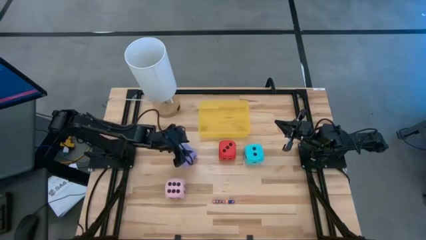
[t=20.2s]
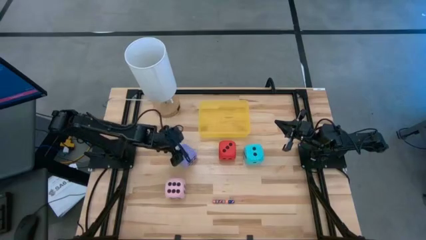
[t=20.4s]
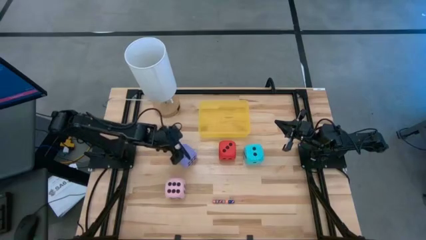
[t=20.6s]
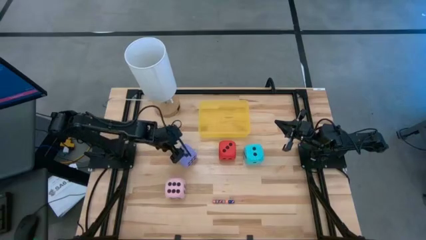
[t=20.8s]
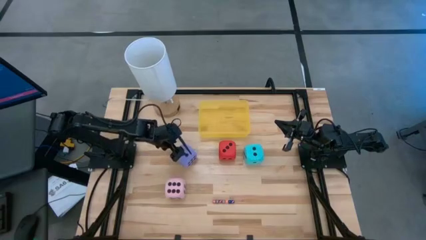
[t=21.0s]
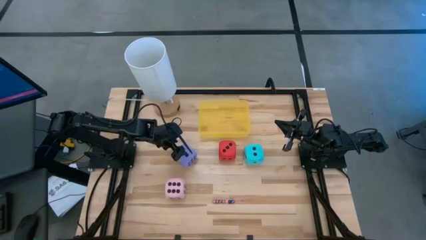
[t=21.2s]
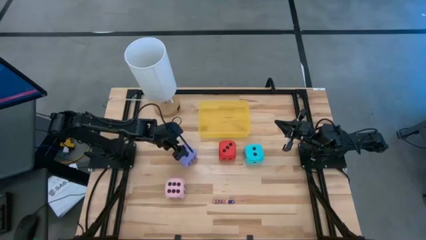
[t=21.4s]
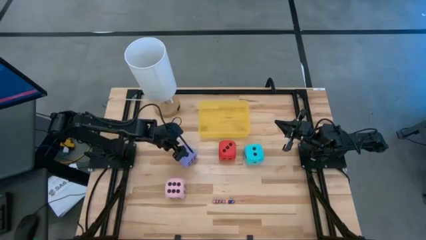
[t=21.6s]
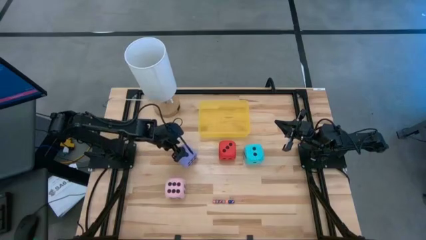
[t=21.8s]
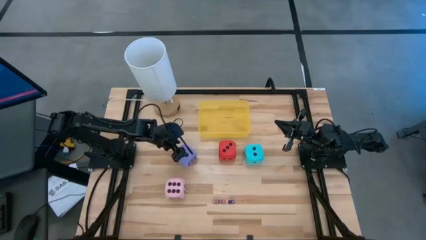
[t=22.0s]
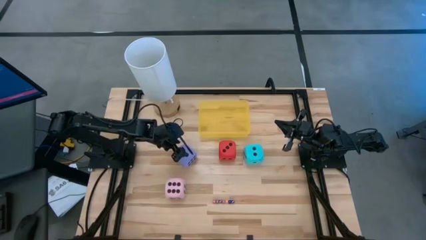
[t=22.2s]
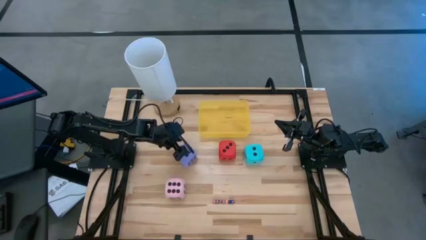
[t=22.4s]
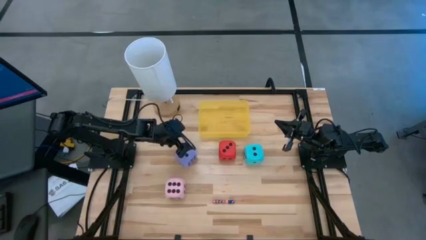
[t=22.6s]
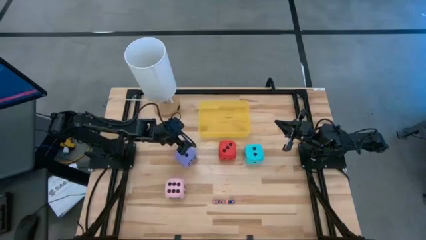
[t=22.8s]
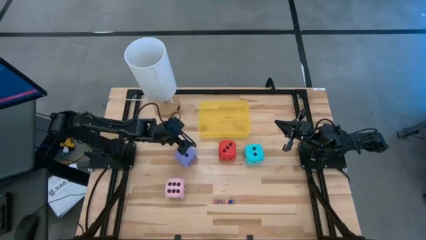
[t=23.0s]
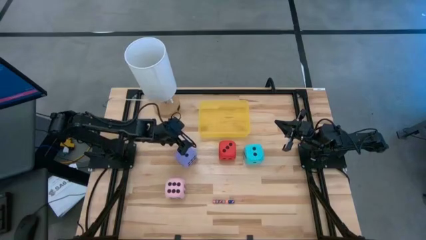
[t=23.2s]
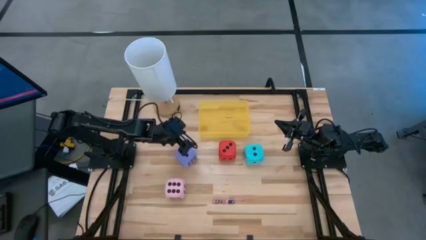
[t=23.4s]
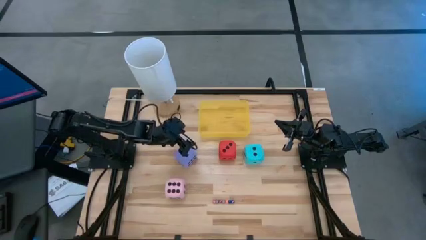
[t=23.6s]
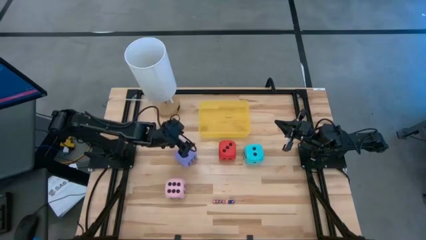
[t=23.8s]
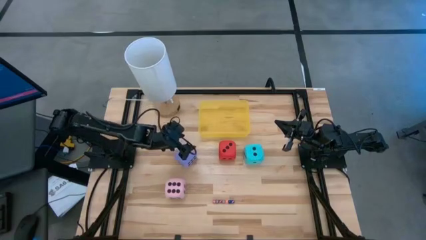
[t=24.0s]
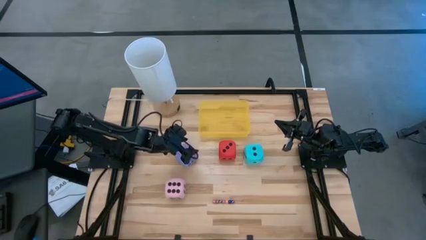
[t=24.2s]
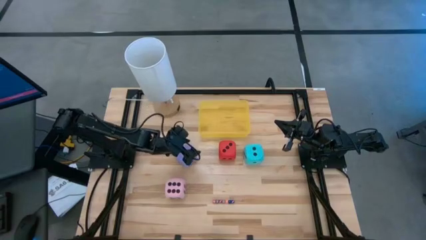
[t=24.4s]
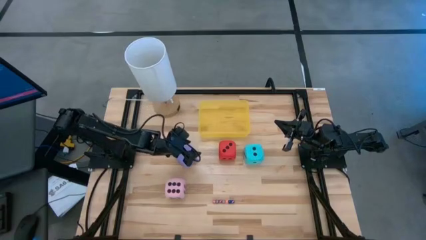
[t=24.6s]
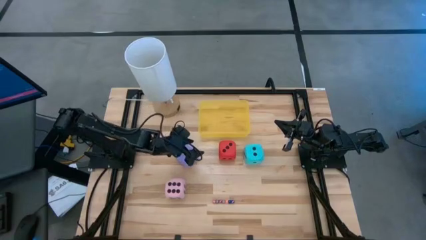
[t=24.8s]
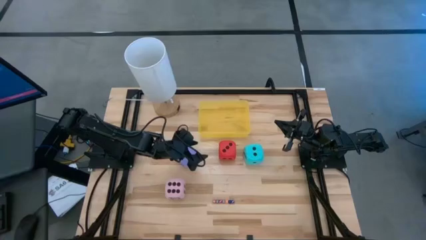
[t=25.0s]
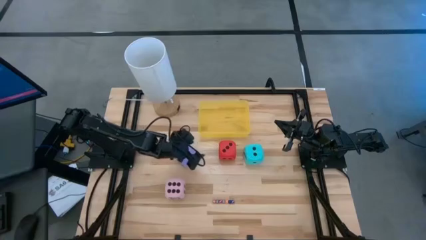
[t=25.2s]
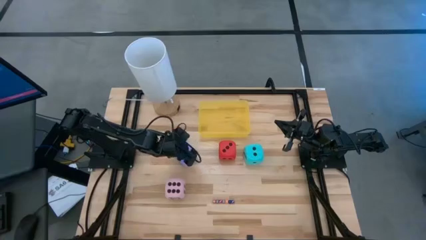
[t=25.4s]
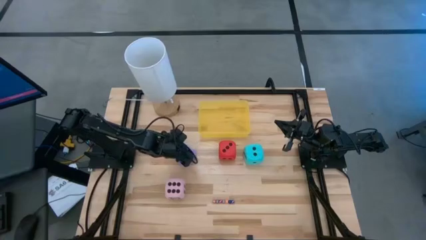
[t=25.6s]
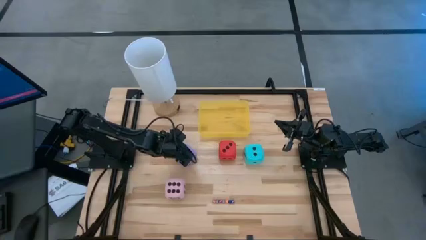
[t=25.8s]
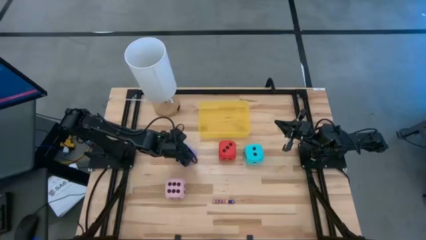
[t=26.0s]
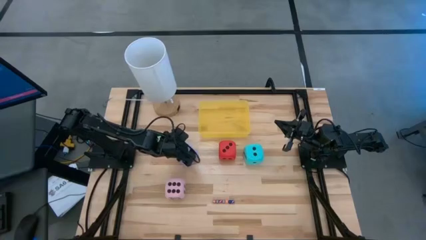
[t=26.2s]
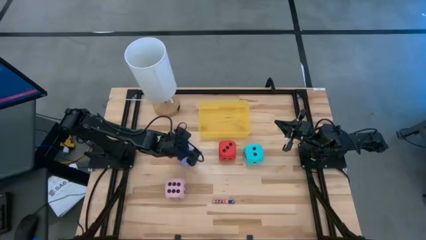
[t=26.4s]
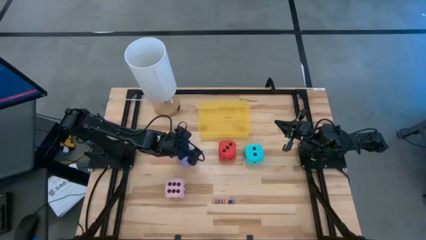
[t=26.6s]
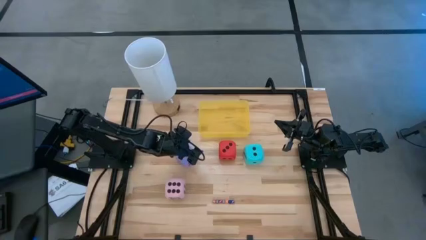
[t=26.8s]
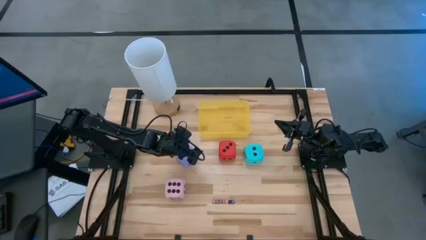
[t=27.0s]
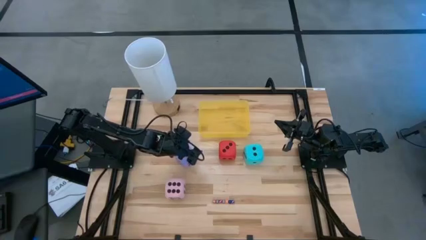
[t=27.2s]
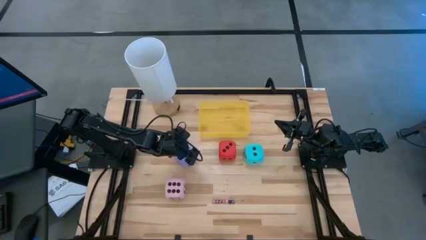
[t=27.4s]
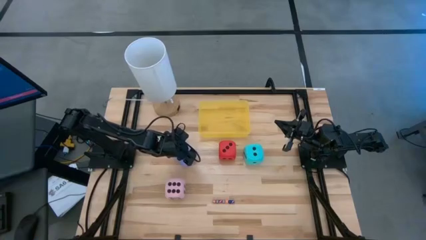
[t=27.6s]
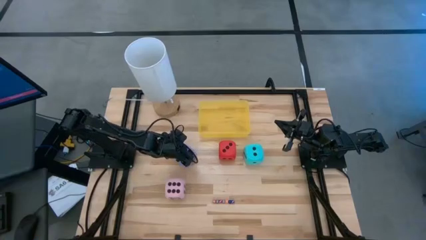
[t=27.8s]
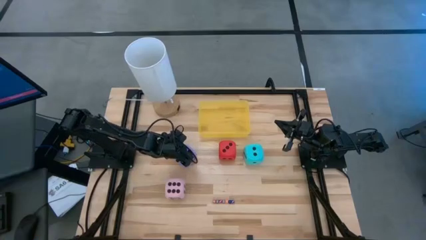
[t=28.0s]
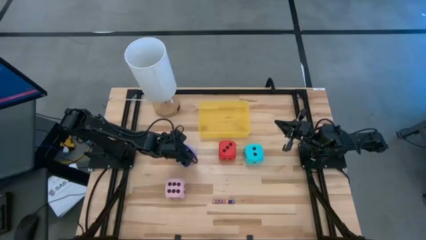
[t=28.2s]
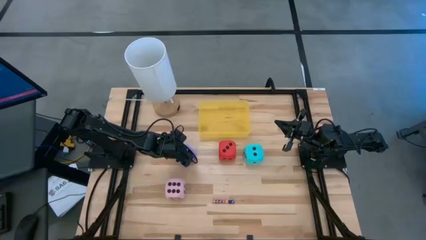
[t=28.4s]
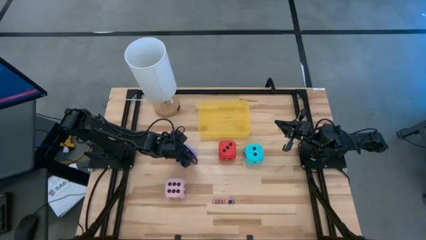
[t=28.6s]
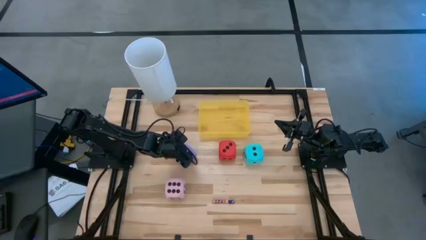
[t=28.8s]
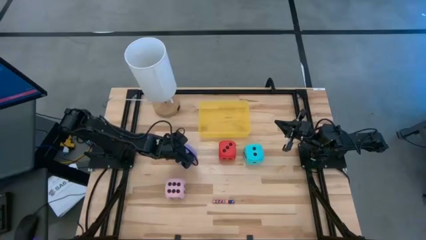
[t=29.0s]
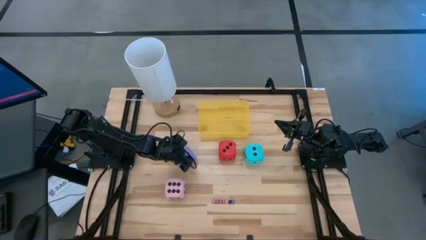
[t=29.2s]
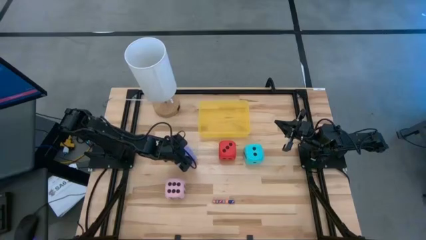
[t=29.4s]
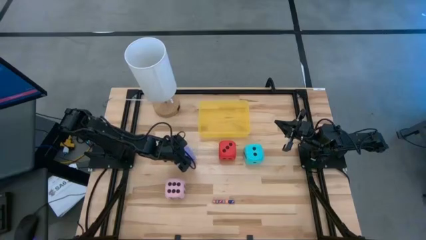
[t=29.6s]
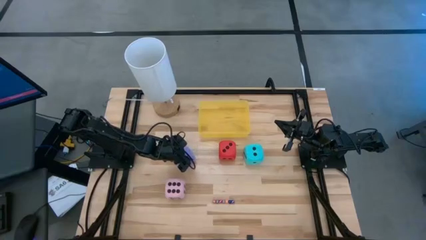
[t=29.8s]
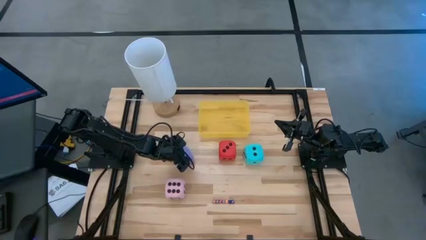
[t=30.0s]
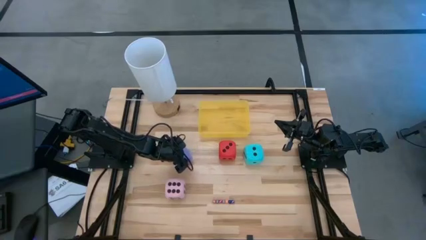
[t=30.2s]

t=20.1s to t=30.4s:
Task: Pick & Place Dice
Put the big purple dice into the yellow bin
